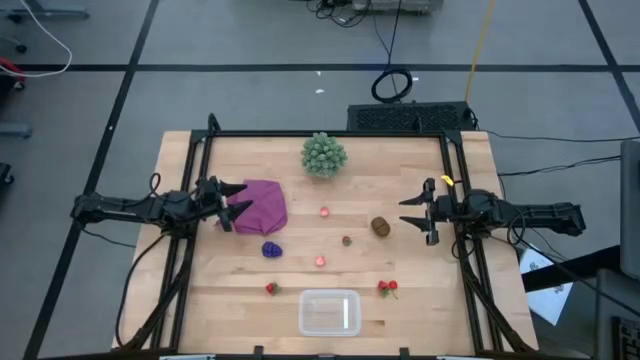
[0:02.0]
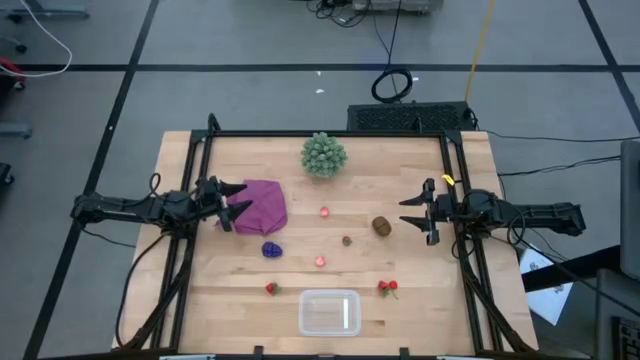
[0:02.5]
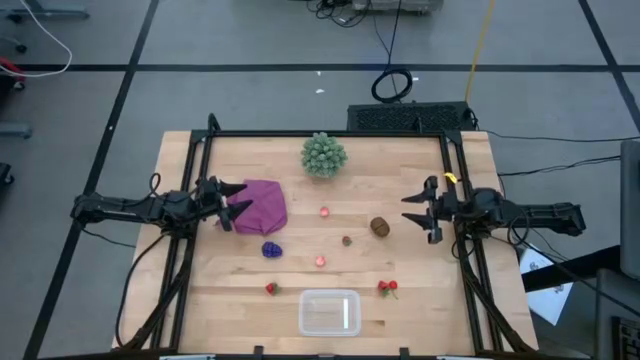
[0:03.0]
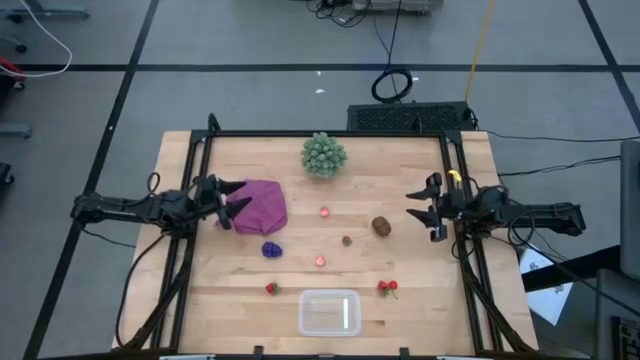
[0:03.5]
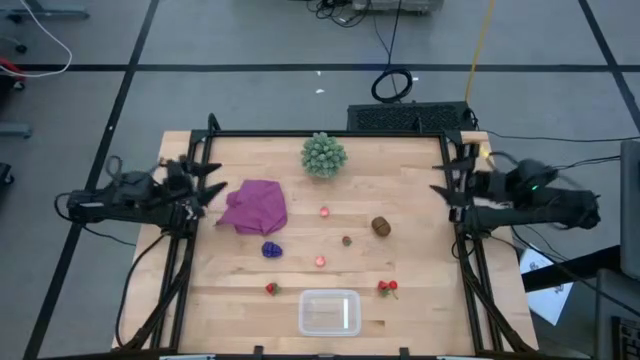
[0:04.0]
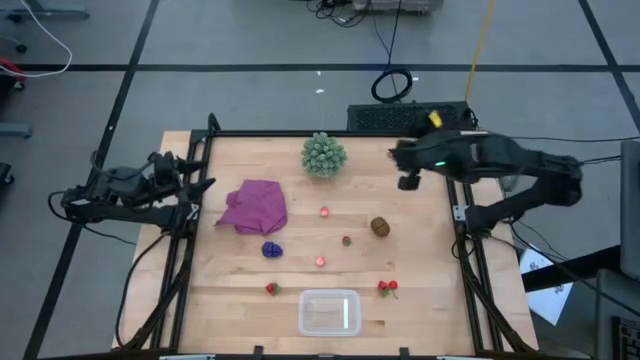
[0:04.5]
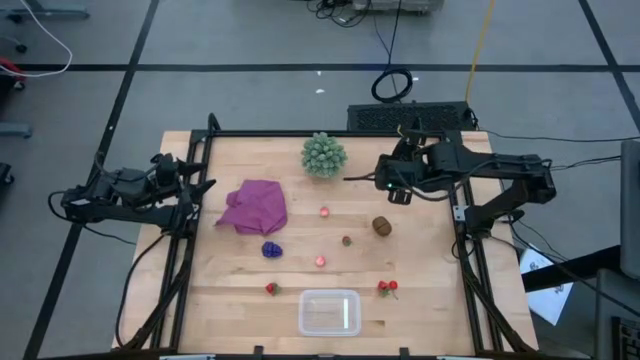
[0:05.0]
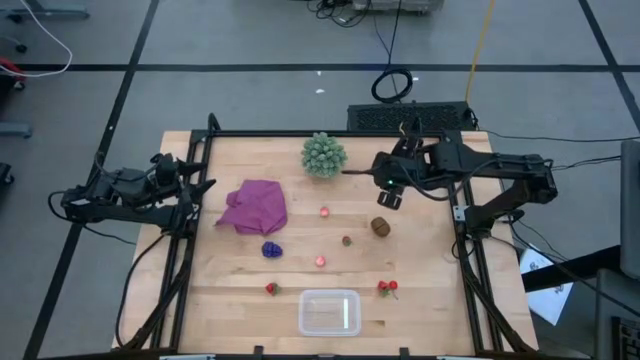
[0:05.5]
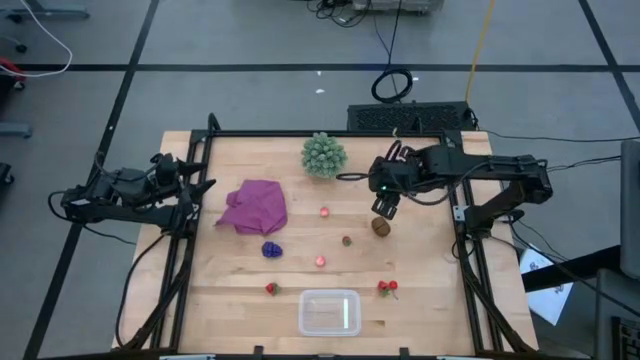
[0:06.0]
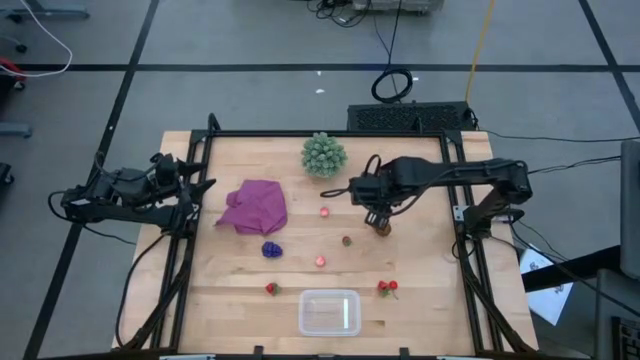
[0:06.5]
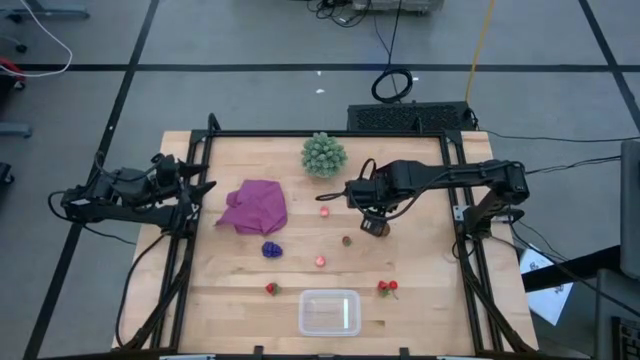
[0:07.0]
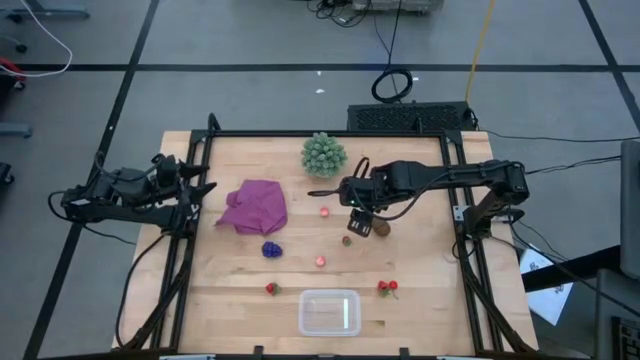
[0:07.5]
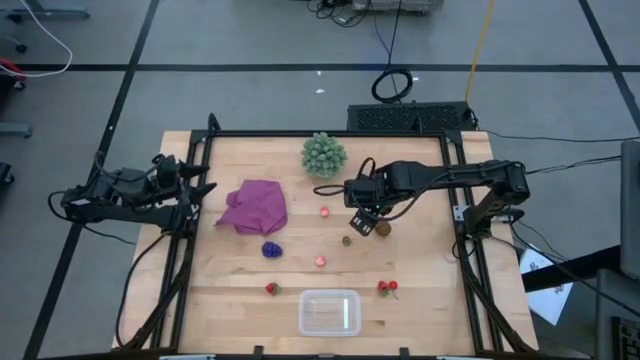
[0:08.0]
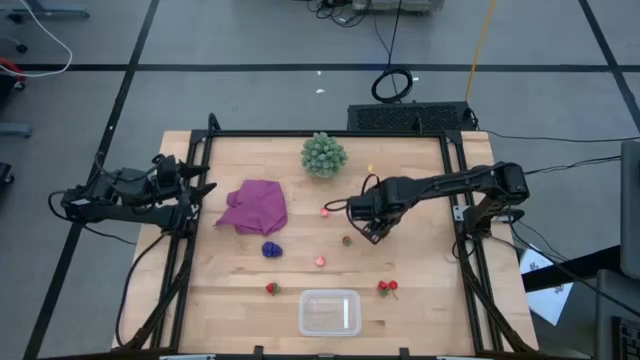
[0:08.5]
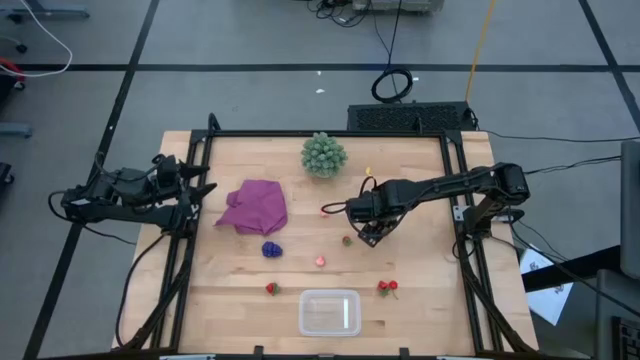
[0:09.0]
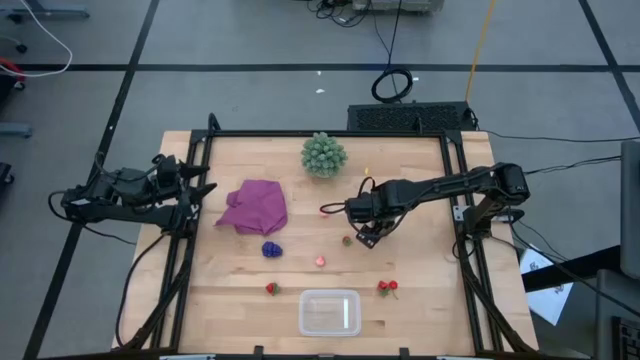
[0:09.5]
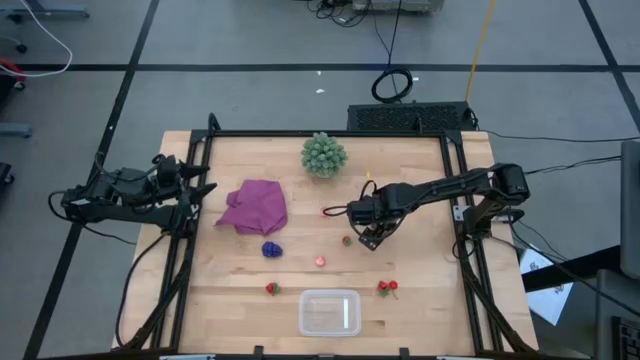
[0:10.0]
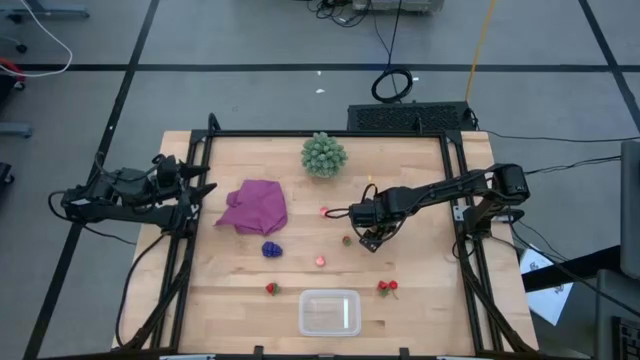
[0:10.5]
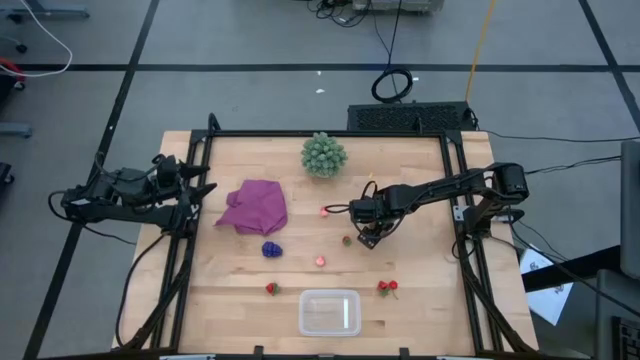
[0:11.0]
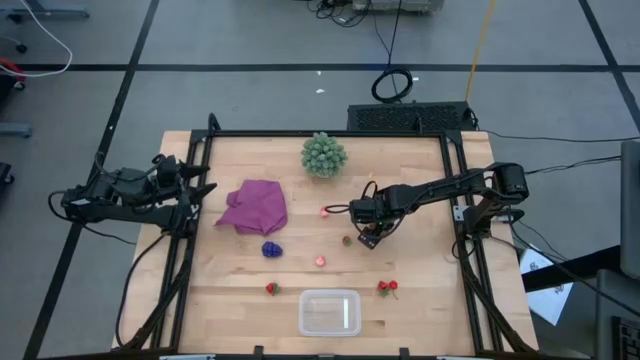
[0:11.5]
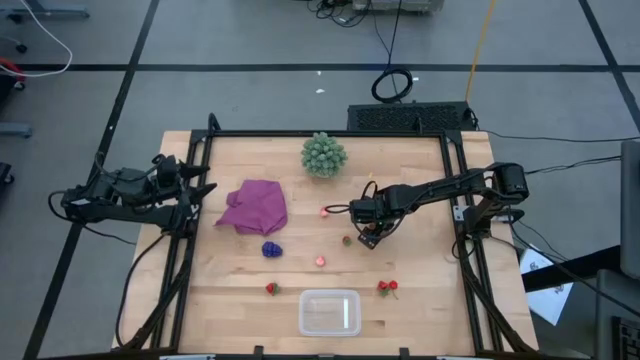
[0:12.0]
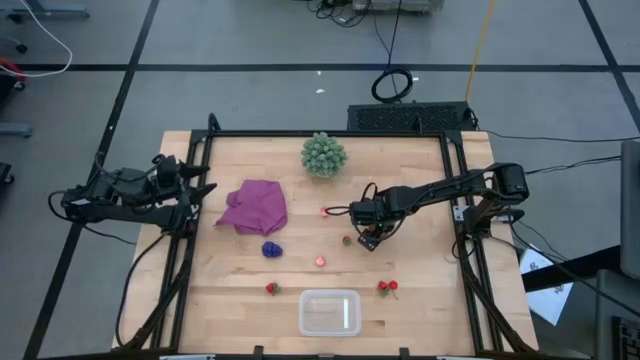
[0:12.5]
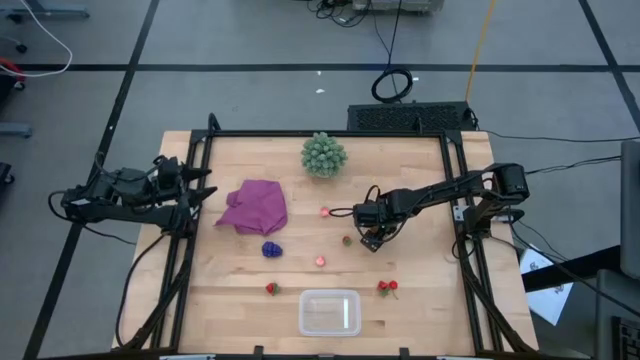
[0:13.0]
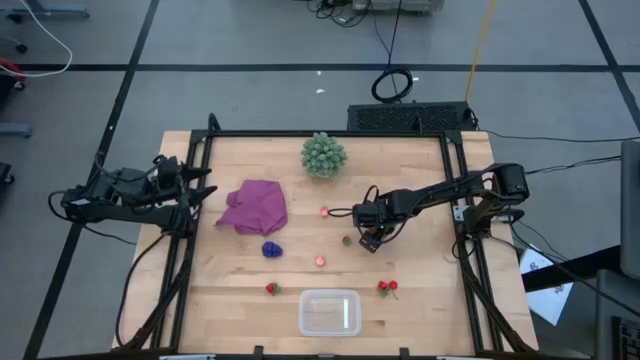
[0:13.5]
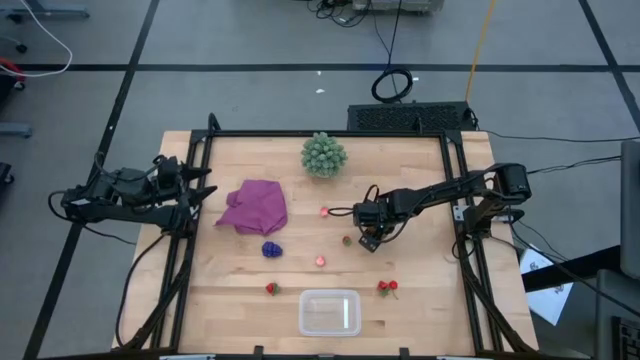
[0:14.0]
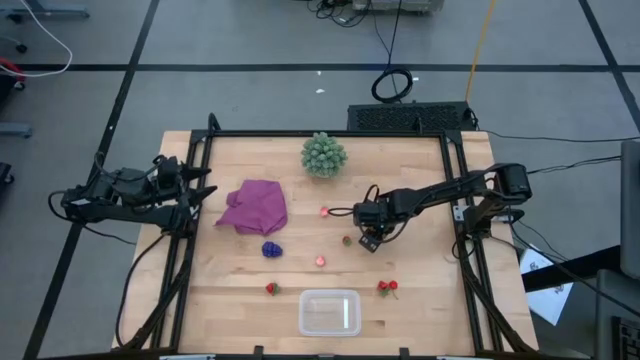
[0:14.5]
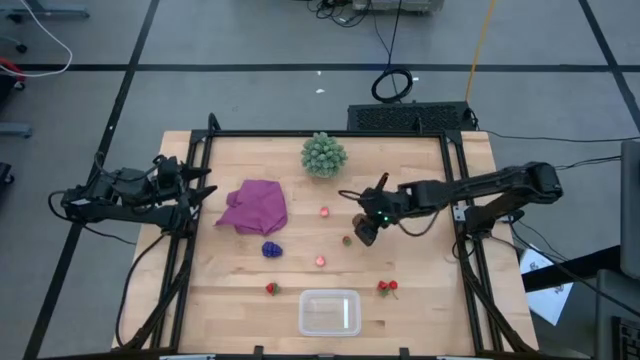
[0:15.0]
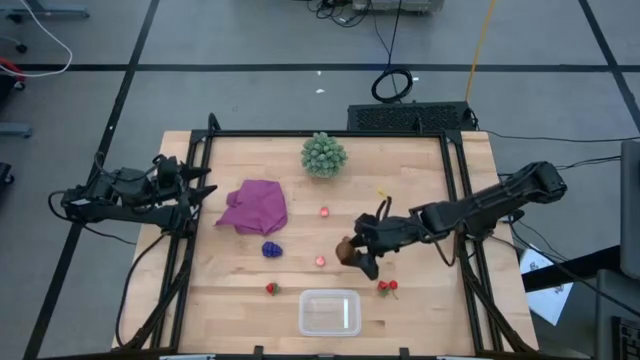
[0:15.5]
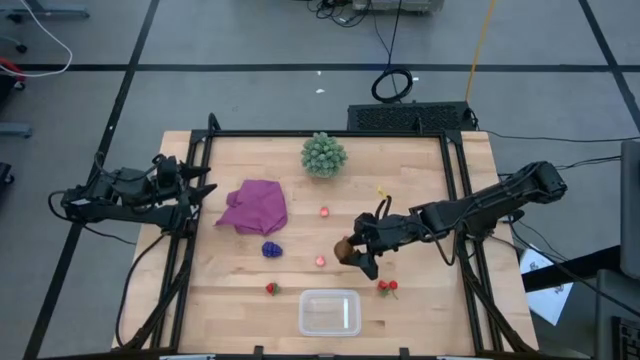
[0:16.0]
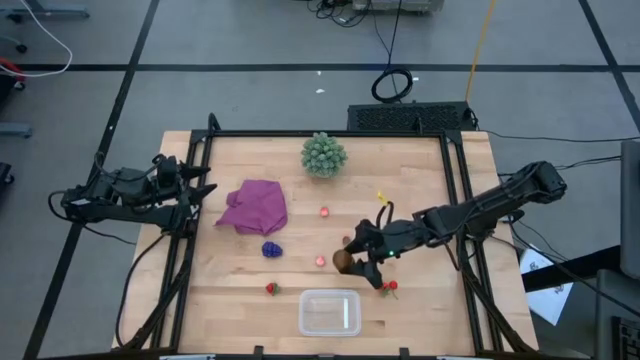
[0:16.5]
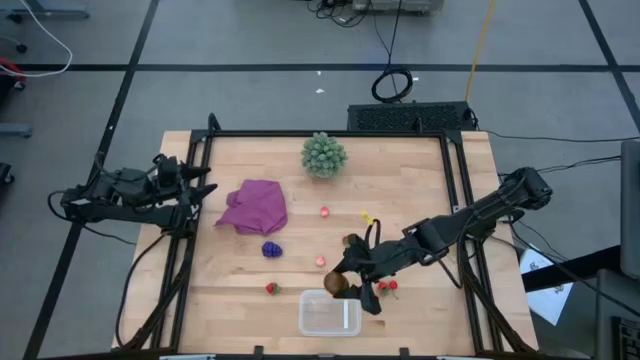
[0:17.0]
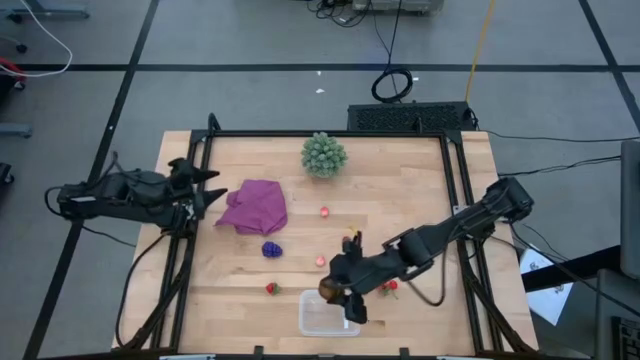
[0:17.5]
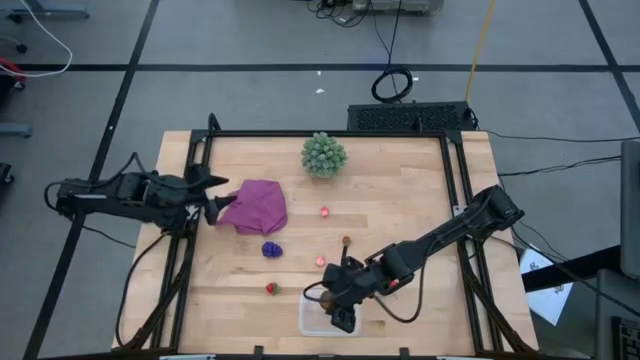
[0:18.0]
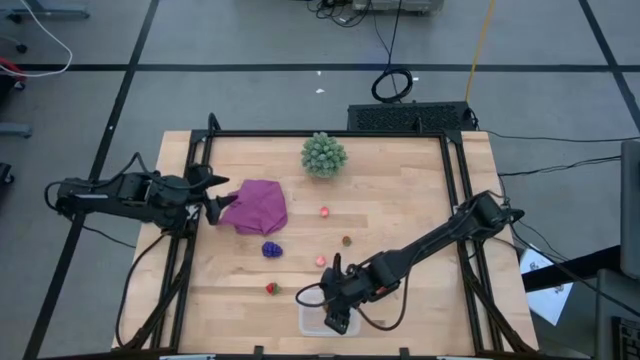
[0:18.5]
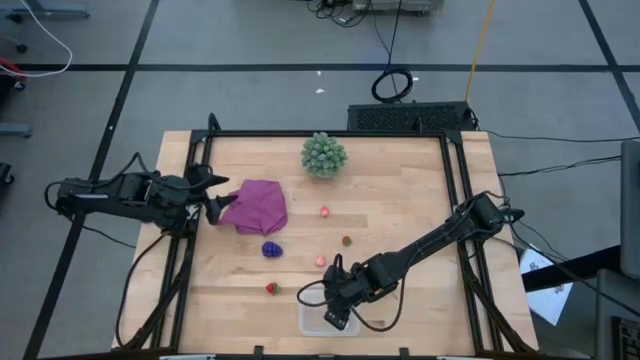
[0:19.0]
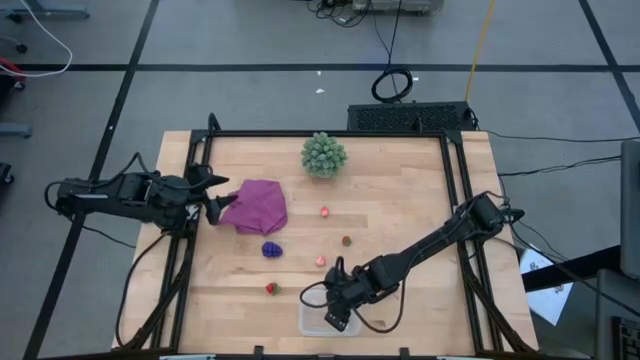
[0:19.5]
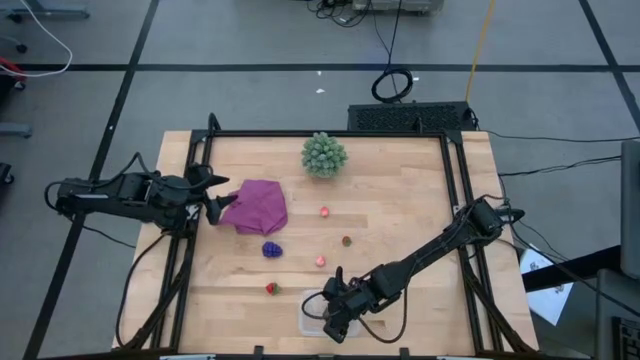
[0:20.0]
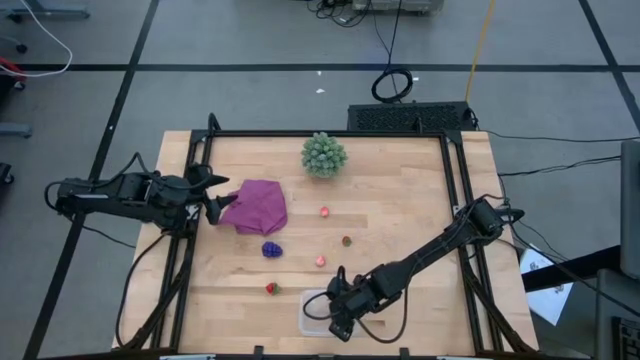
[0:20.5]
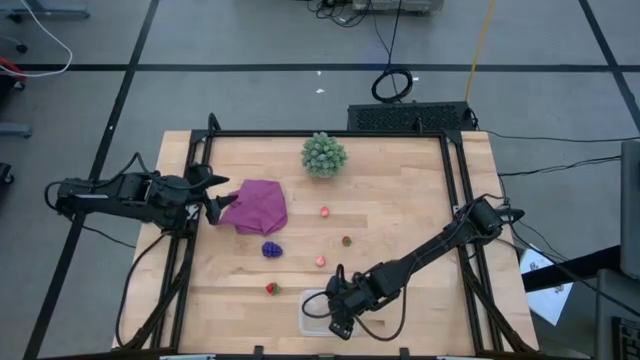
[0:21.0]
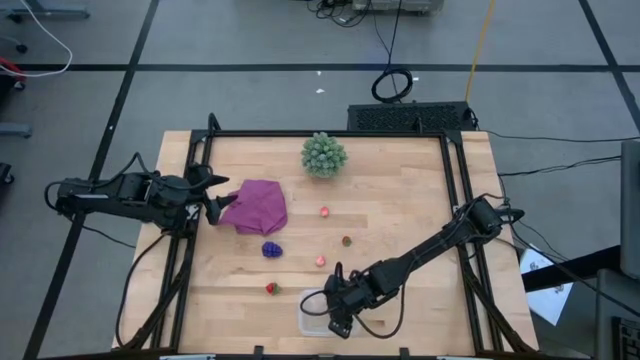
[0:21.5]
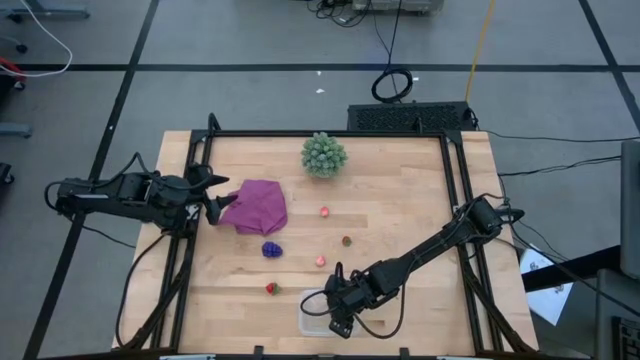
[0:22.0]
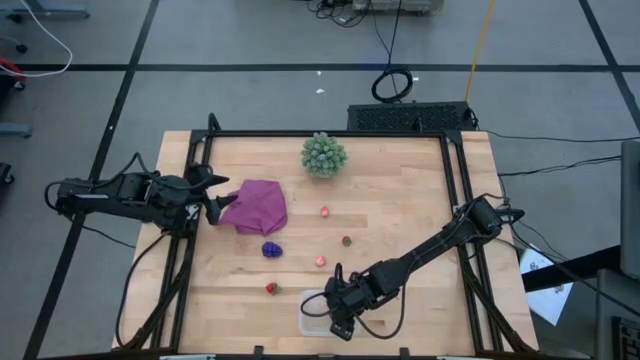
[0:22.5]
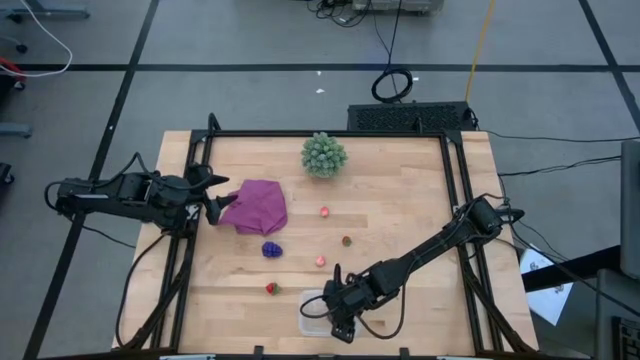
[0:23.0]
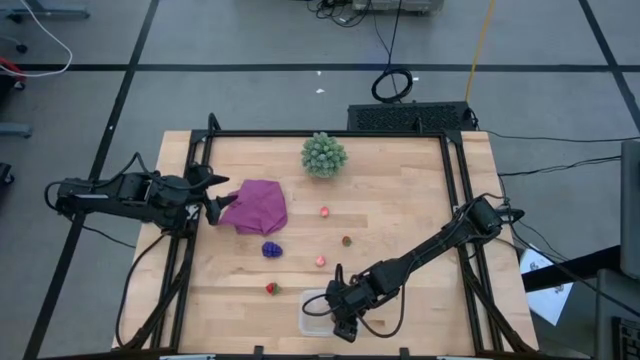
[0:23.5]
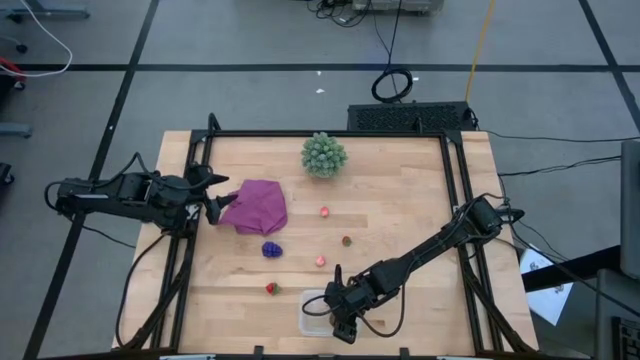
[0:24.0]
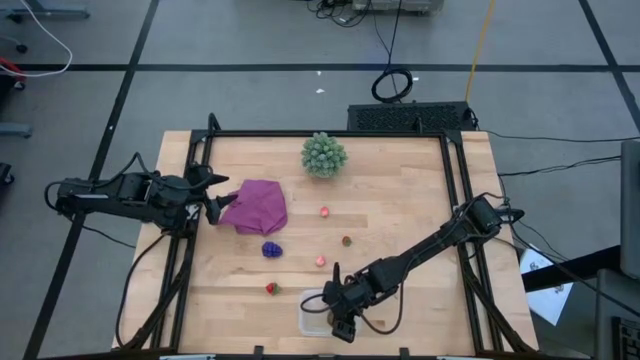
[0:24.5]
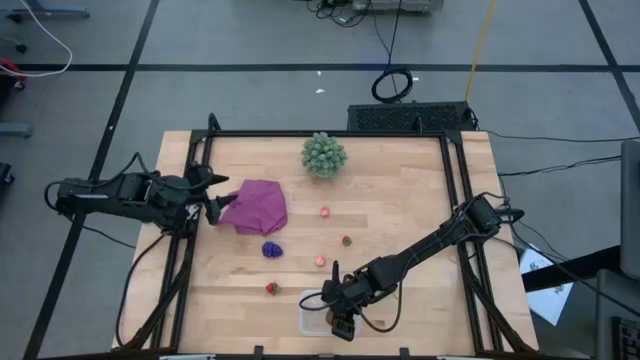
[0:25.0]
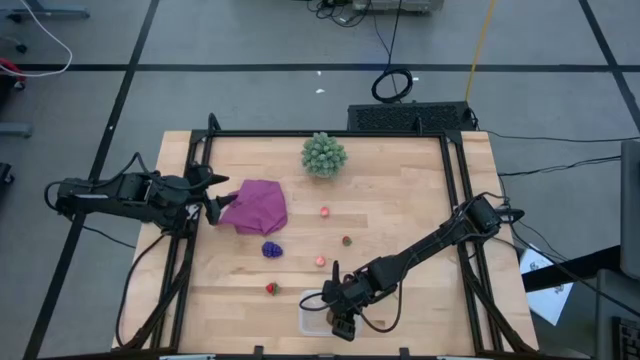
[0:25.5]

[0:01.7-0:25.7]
Task: Pick and placing Produce into tupperware
Put the brown kiwi into the transparent container
